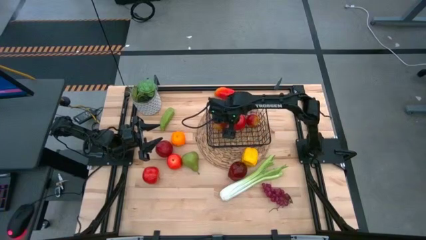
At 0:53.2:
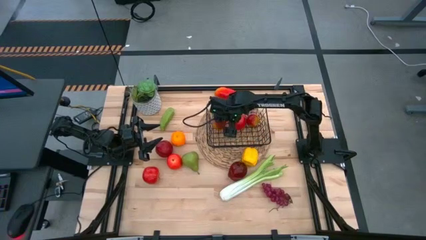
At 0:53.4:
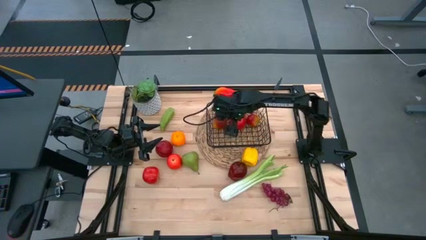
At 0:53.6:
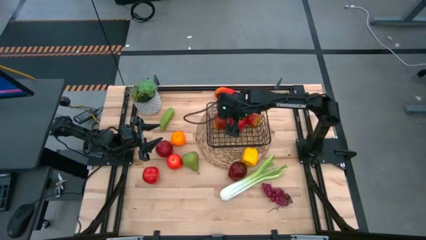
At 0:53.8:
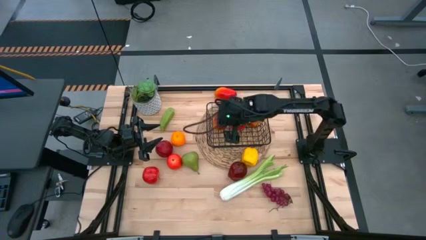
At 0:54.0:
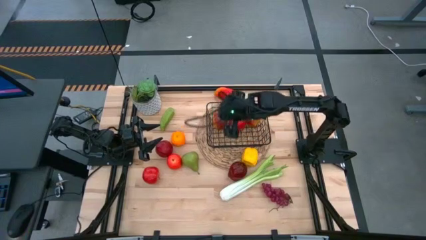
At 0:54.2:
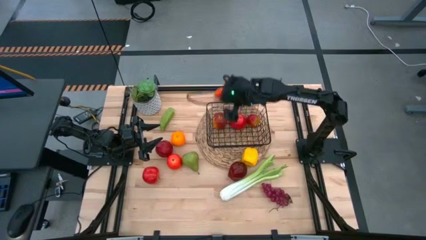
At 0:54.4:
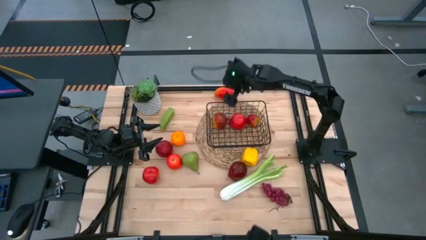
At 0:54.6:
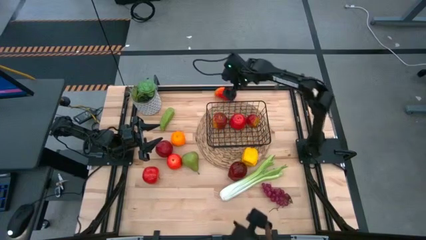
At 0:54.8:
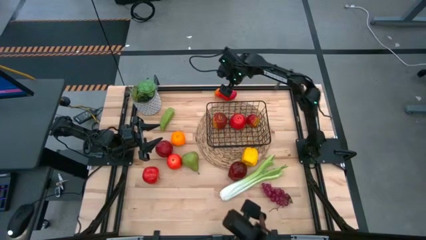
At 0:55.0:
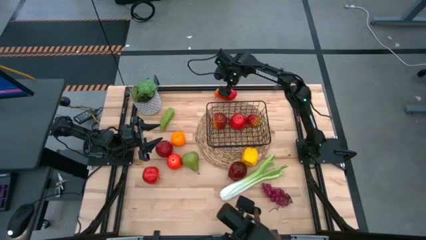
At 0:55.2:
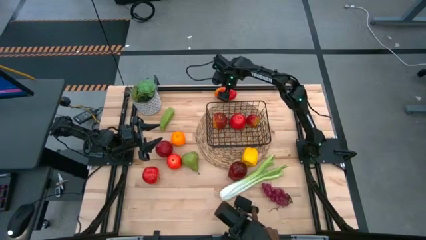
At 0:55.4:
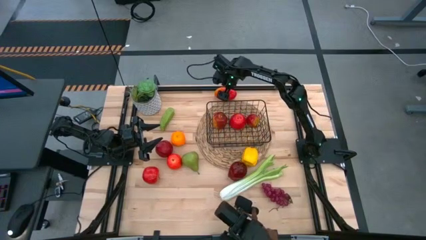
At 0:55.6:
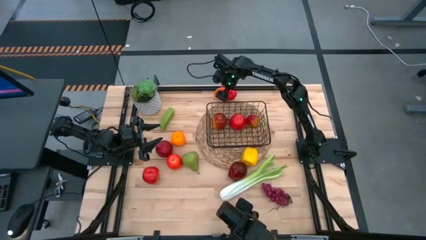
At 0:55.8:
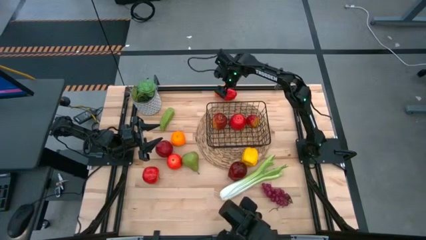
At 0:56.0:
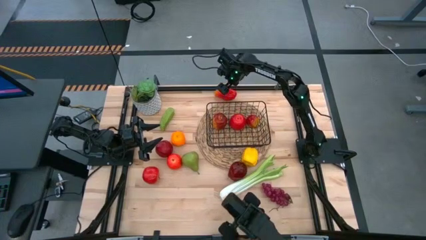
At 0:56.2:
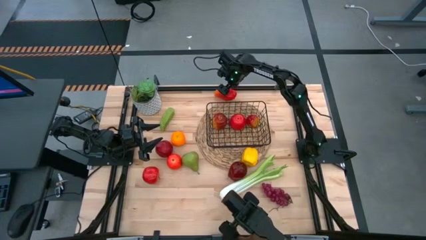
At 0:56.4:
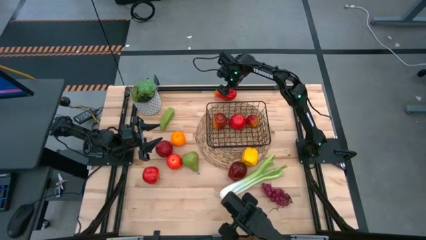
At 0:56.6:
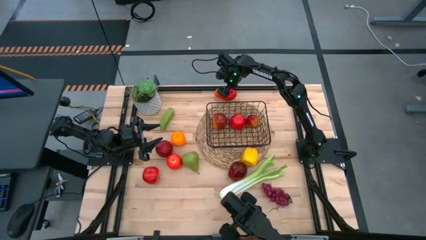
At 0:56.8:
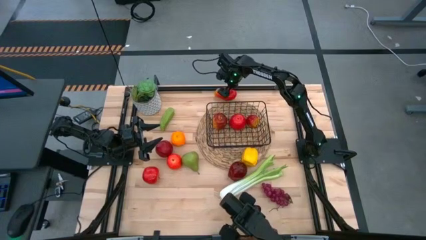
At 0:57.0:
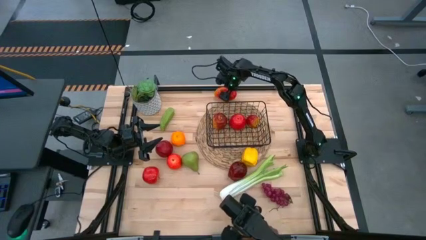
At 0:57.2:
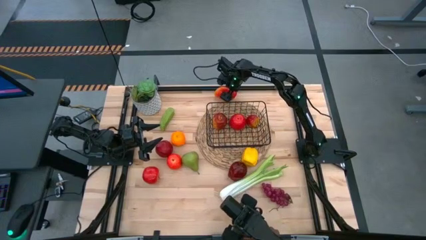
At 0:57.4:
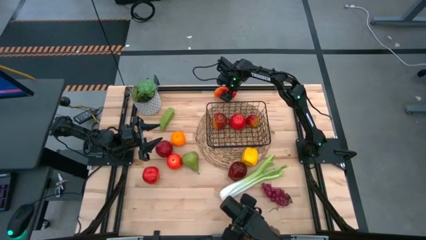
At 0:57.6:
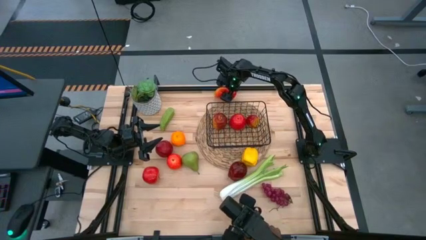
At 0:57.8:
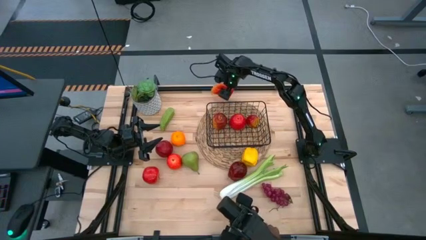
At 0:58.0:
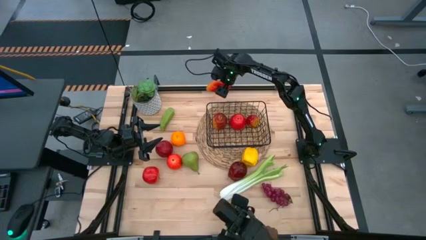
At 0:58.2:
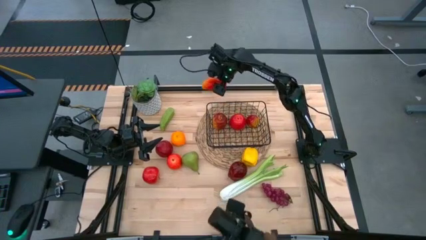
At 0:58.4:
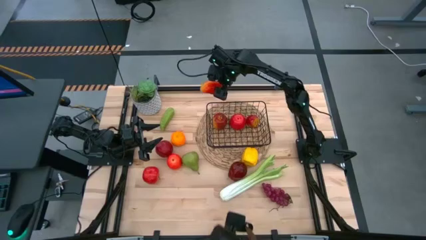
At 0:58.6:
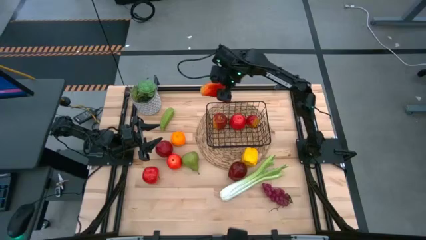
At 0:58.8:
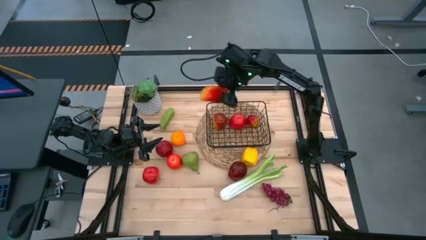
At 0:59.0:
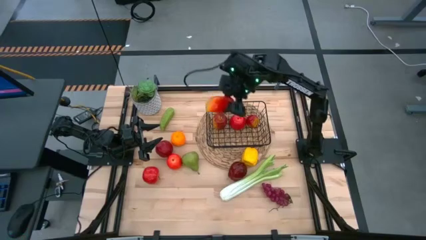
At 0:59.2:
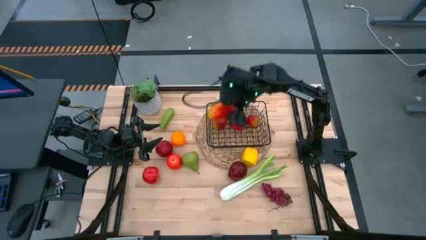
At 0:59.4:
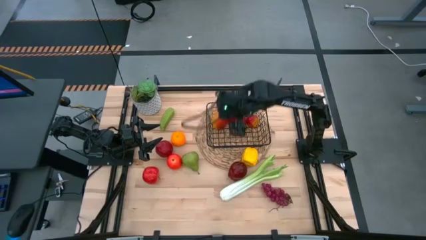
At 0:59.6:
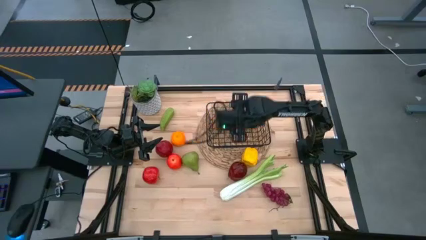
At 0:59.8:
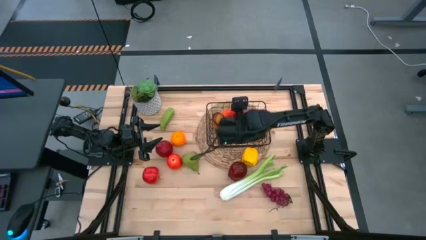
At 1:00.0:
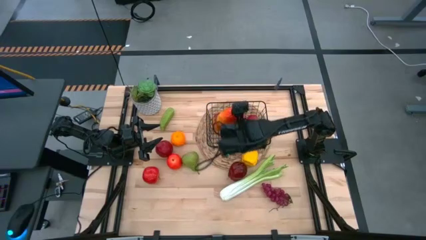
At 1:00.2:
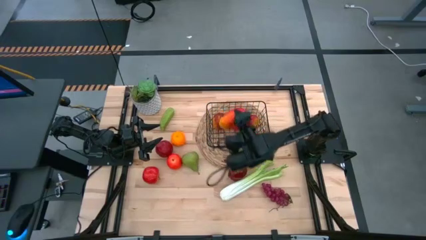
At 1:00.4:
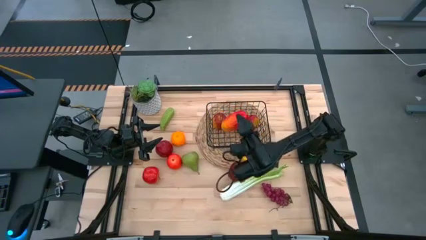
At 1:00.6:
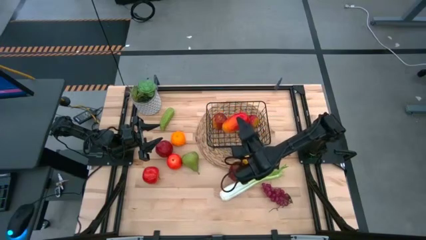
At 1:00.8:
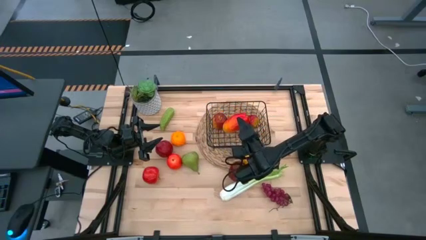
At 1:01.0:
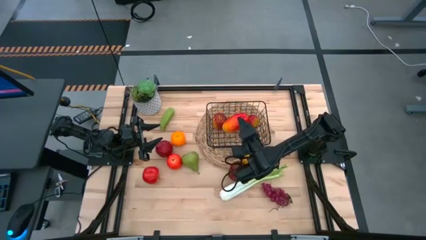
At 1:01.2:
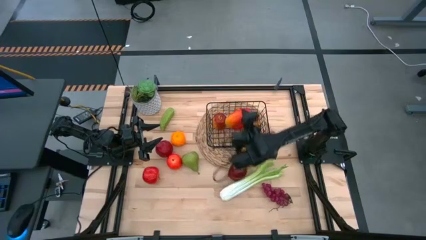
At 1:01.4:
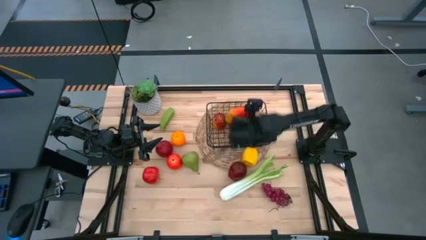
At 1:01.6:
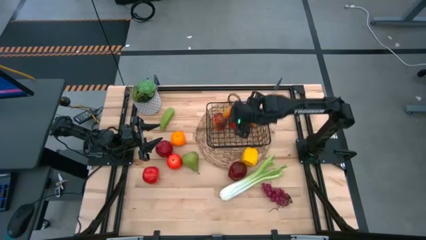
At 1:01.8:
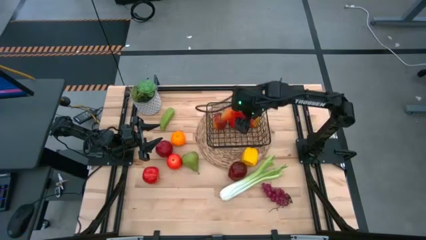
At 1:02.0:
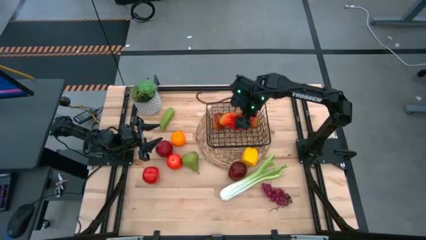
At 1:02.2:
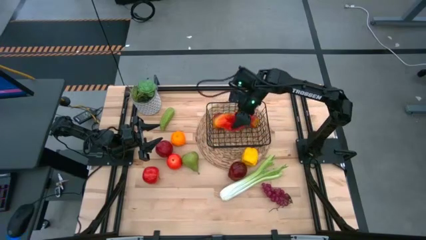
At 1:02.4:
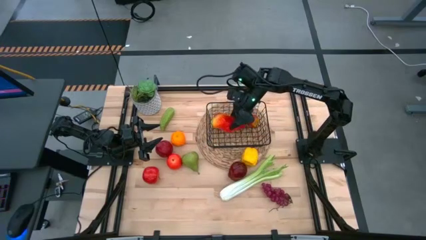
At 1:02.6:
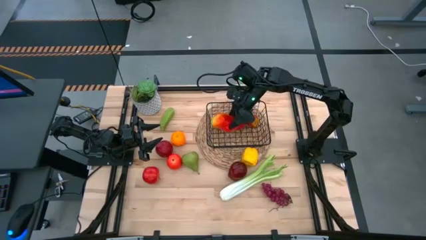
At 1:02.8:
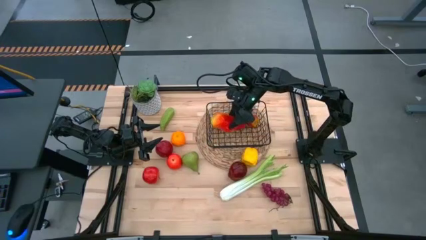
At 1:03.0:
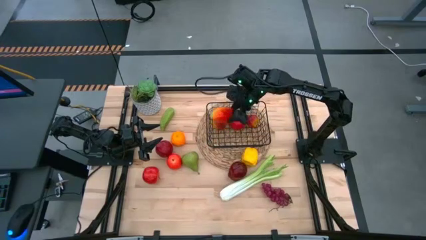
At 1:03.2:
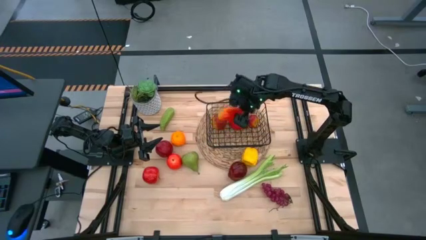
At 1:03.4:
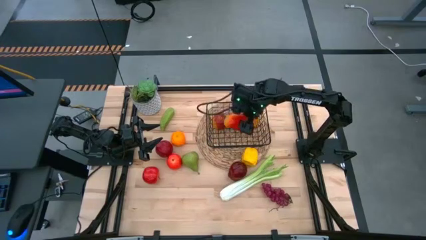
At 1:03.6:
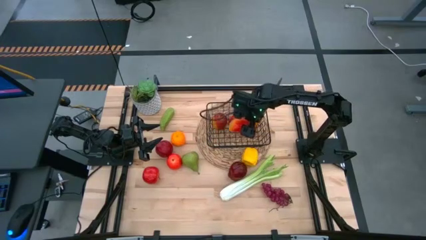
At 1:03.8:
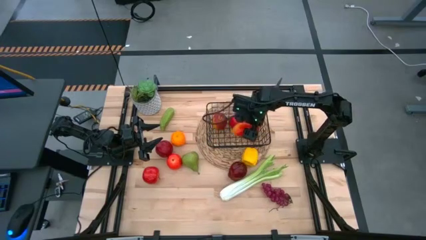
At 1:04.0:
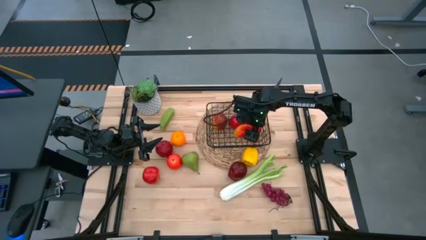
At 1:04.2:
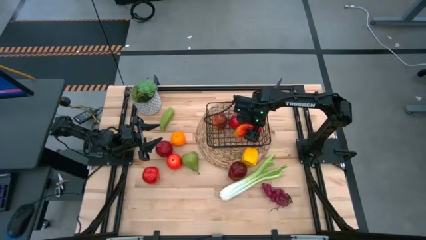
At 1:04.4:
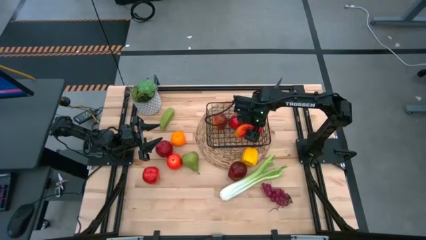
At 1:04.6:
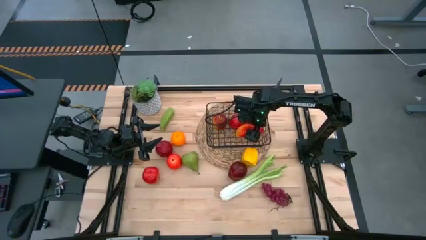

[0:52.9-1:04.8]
Task: Build produce basket
Put the red mango into the black wire basket

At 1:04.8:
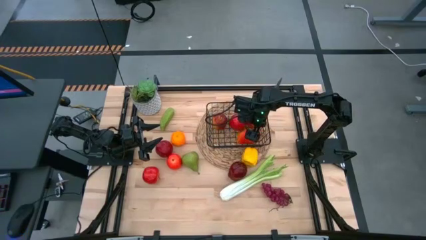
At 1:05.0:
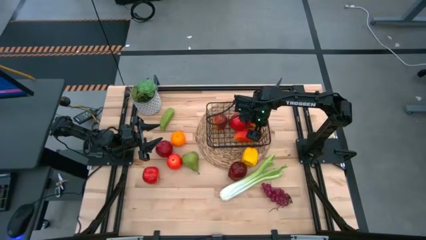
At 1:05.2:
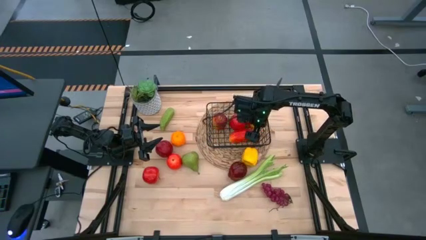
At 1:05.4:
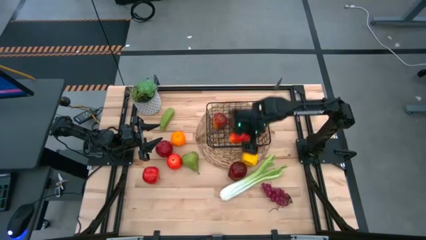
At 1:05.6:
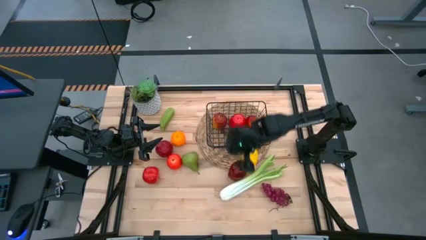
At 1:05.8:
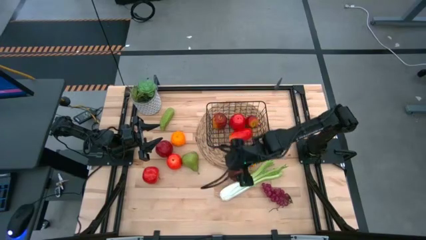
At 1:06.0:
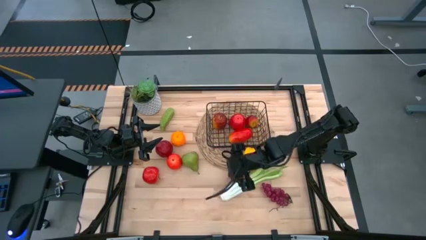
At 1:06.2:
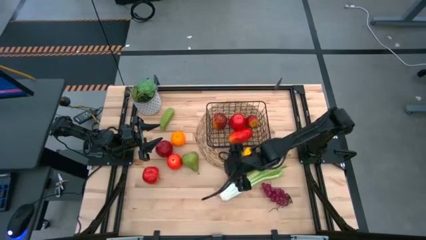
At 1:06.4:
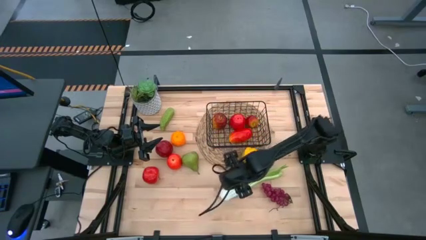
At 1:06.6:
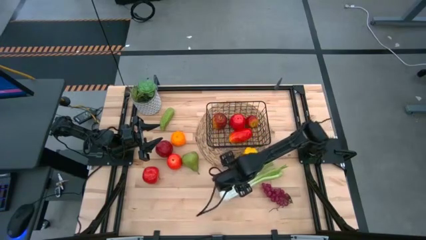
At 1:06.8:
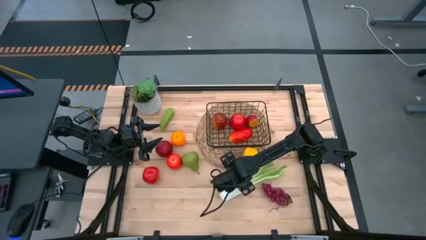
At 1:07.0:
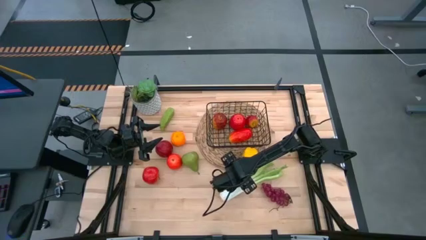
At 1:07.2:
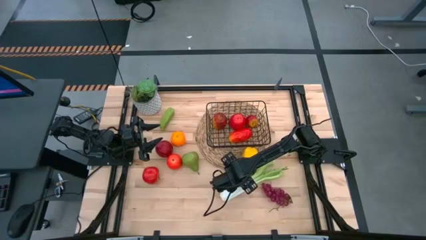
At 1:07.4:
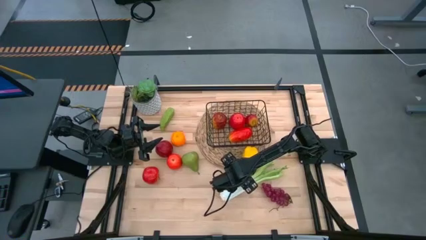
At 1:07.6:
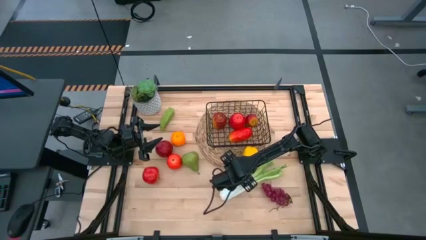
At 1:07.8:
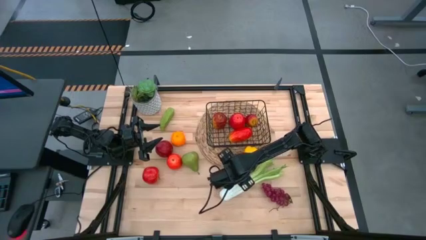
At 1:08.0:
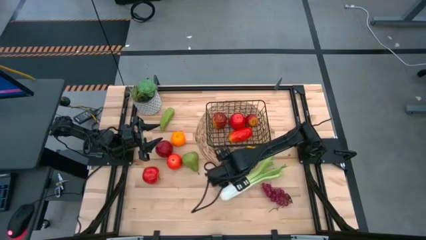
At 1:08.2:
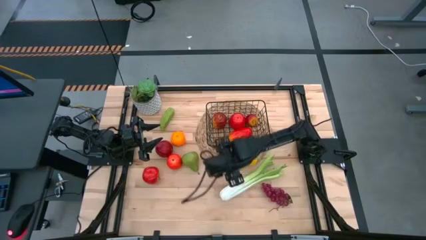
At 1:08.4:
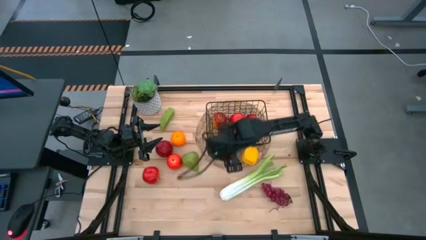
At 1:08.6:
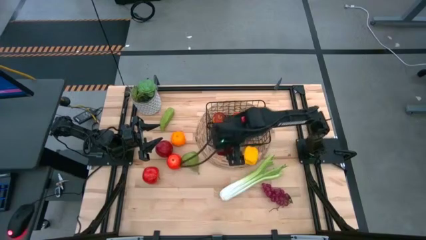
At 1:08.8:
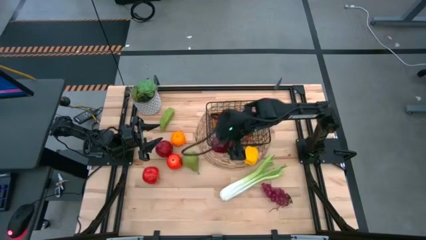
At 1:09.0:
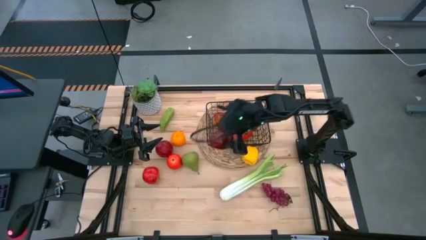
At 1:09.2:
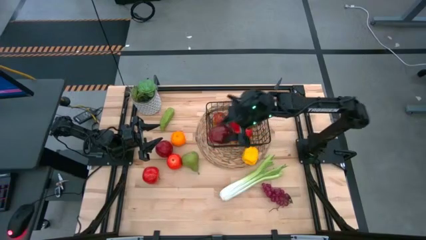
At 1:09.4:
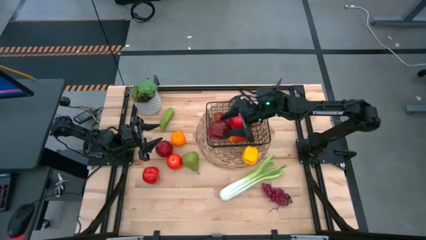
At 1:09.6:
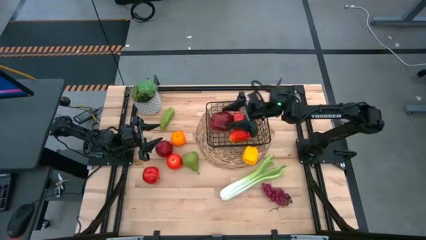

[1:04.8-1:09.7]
Put the dark apple into the black wire basket
